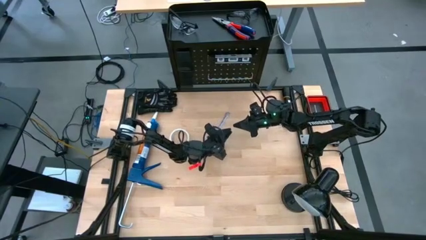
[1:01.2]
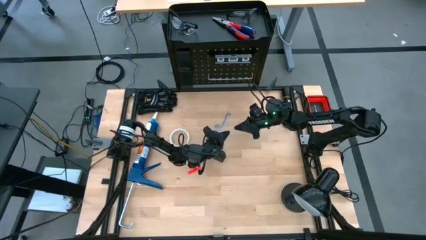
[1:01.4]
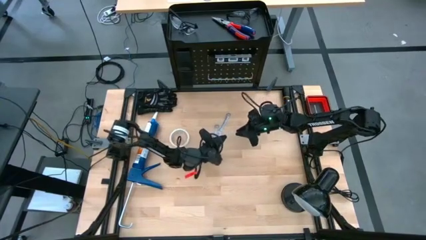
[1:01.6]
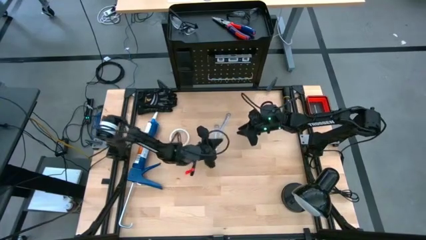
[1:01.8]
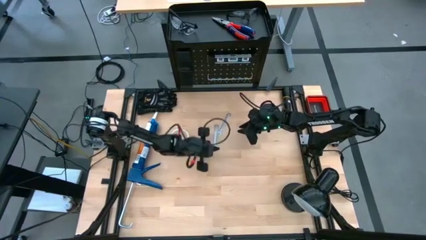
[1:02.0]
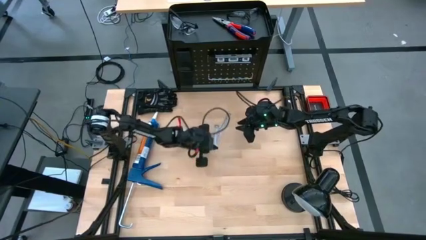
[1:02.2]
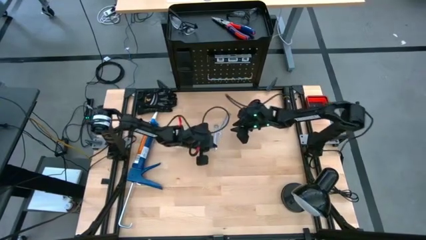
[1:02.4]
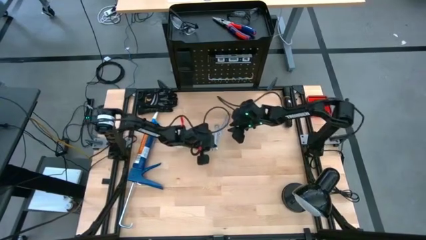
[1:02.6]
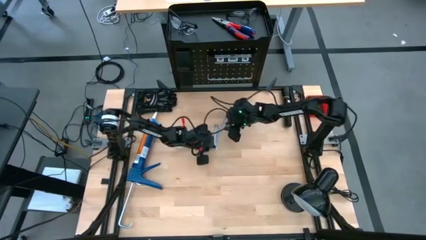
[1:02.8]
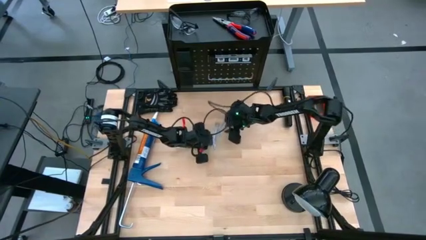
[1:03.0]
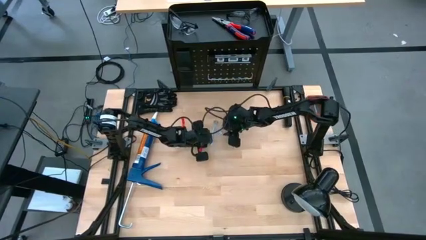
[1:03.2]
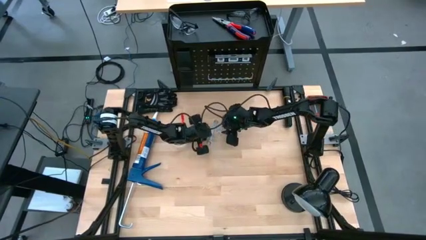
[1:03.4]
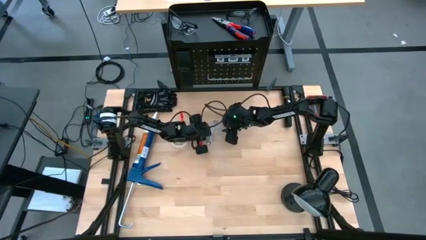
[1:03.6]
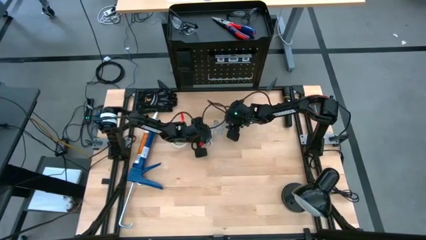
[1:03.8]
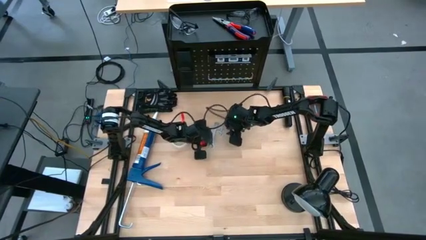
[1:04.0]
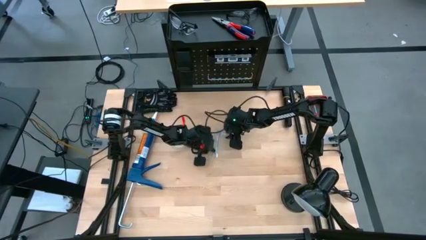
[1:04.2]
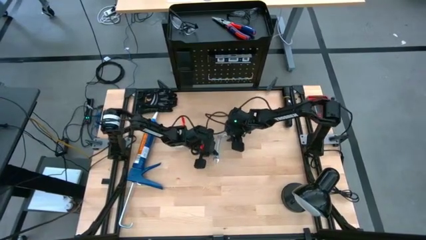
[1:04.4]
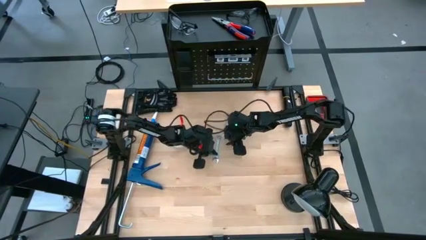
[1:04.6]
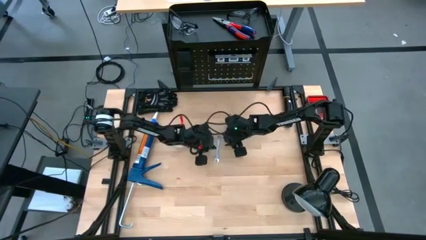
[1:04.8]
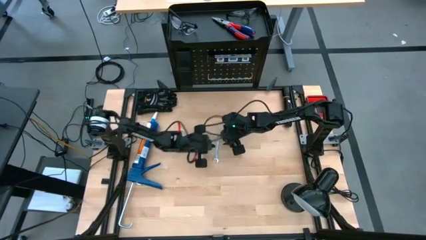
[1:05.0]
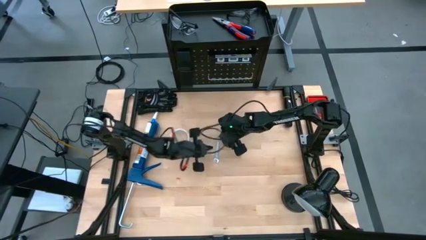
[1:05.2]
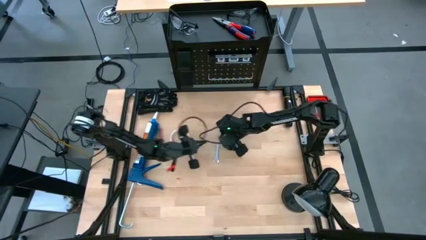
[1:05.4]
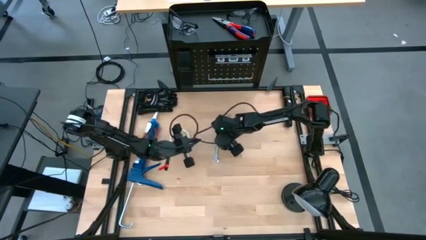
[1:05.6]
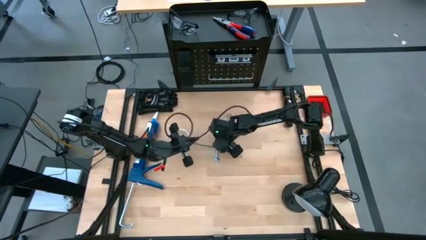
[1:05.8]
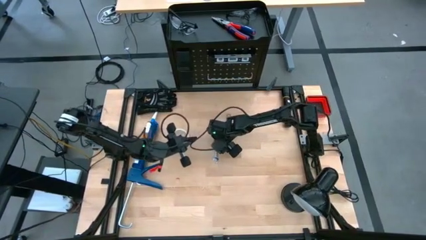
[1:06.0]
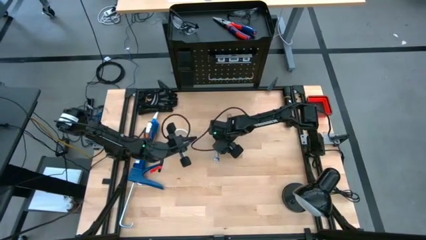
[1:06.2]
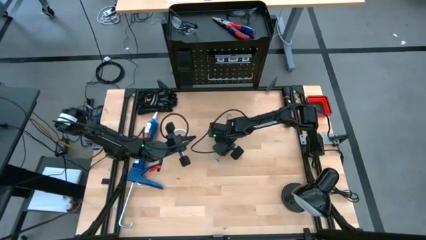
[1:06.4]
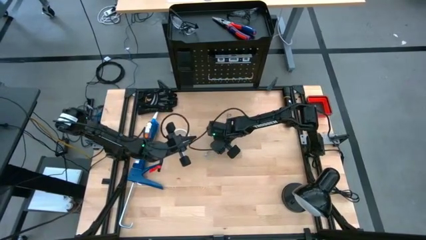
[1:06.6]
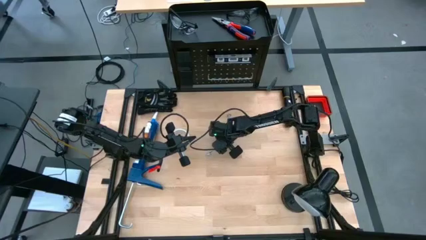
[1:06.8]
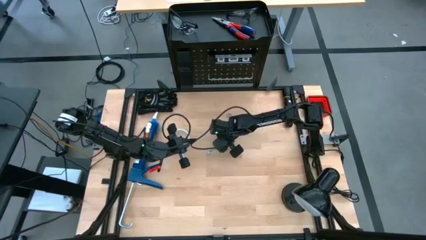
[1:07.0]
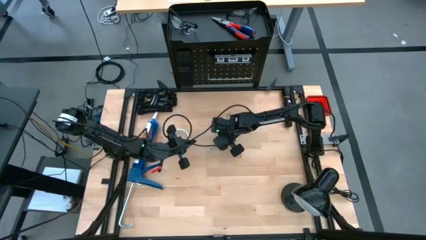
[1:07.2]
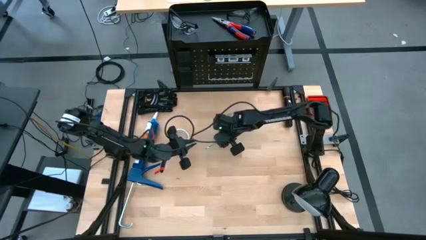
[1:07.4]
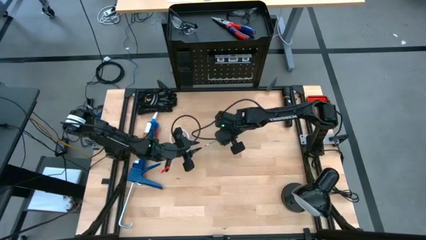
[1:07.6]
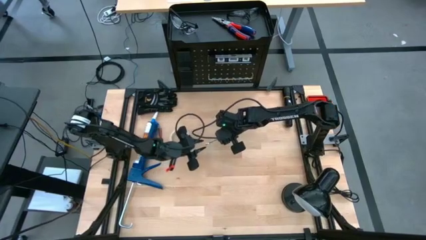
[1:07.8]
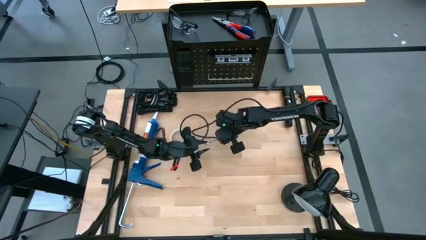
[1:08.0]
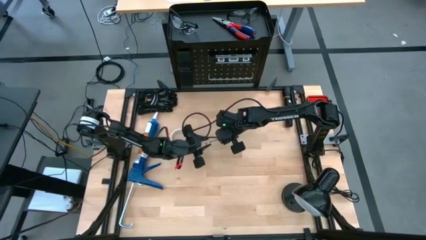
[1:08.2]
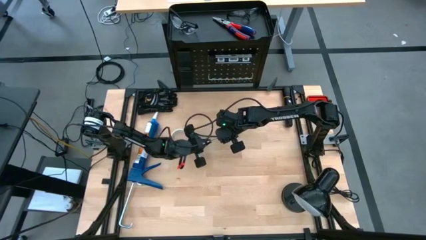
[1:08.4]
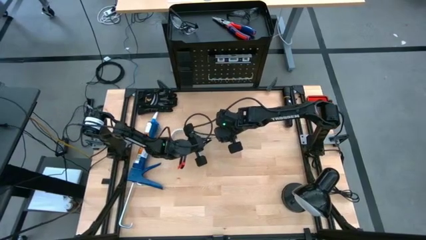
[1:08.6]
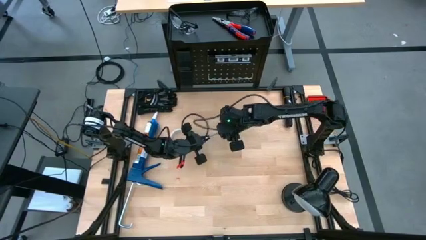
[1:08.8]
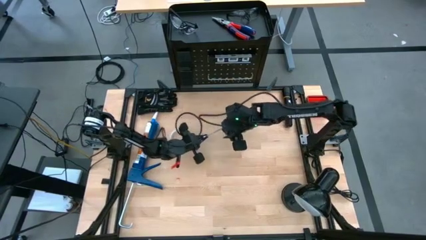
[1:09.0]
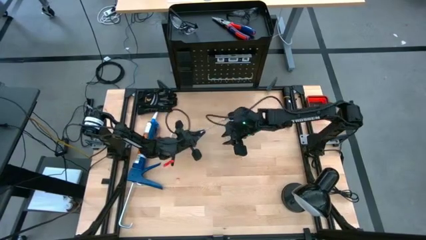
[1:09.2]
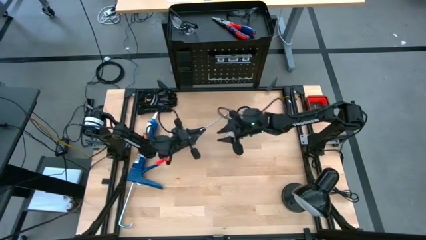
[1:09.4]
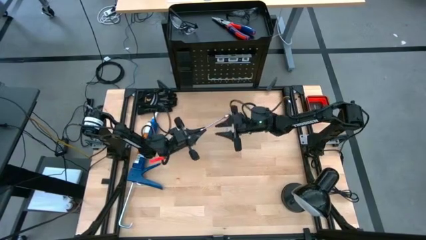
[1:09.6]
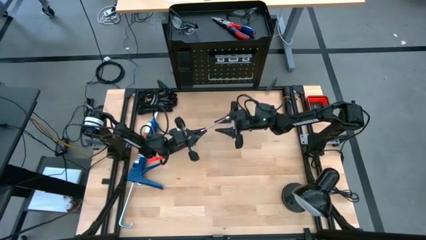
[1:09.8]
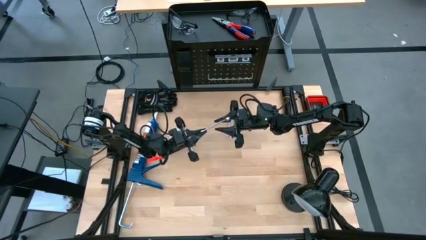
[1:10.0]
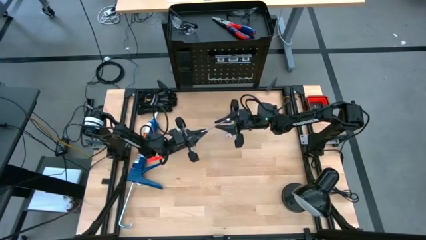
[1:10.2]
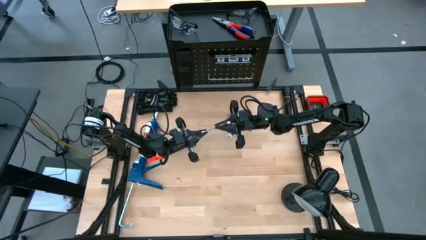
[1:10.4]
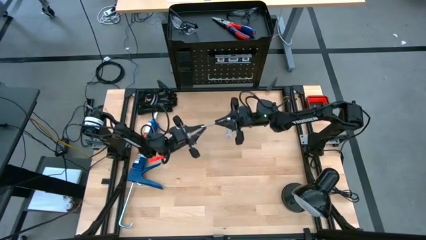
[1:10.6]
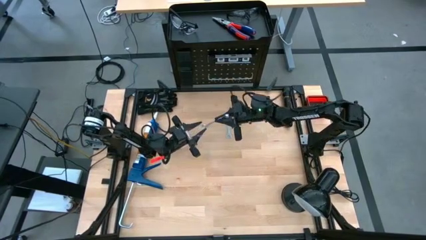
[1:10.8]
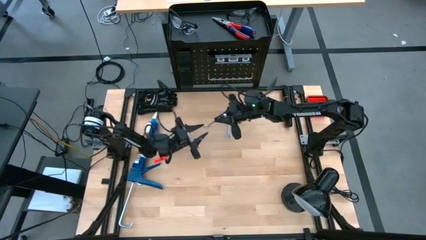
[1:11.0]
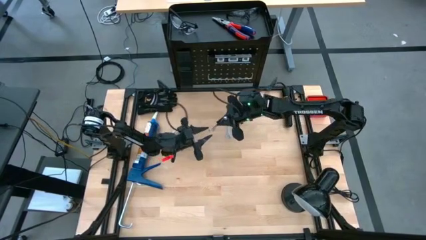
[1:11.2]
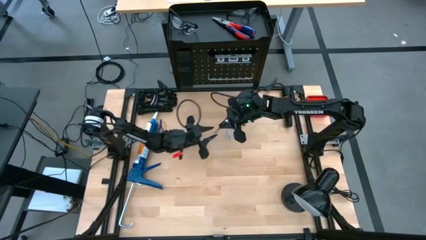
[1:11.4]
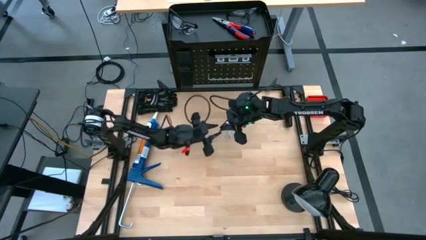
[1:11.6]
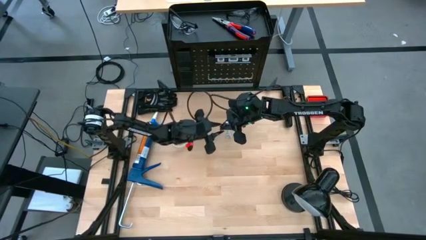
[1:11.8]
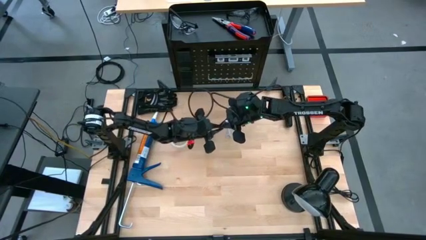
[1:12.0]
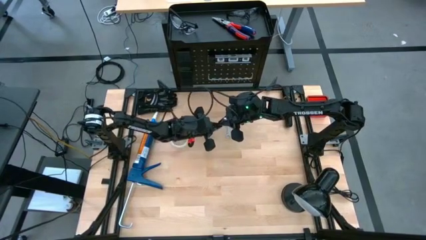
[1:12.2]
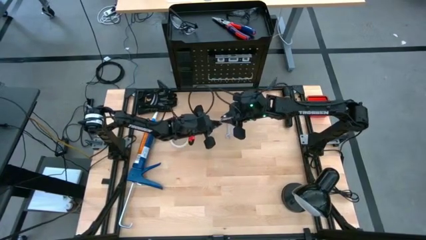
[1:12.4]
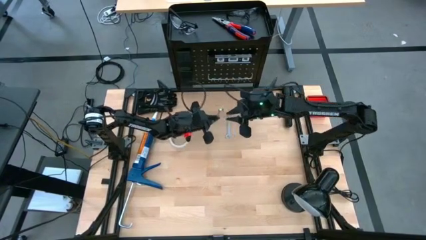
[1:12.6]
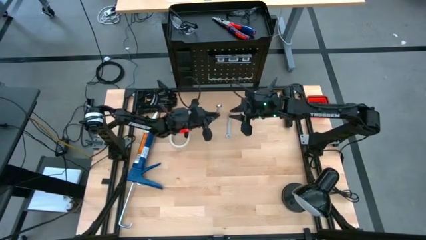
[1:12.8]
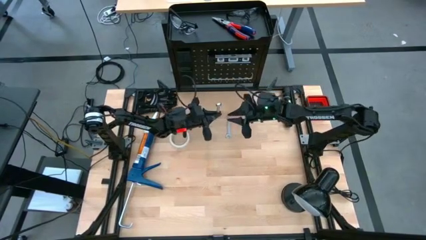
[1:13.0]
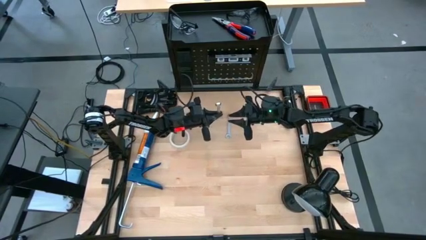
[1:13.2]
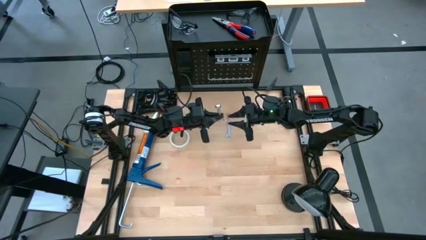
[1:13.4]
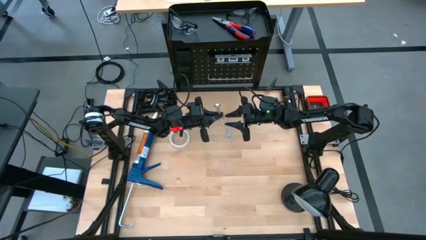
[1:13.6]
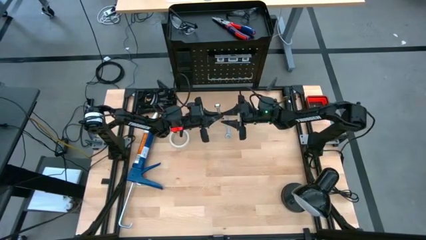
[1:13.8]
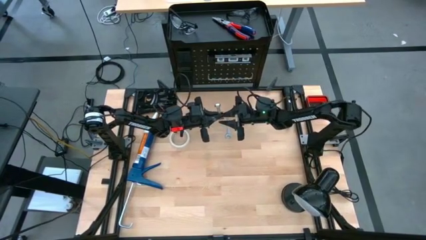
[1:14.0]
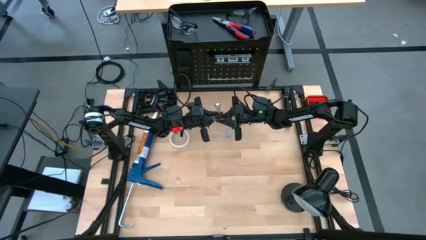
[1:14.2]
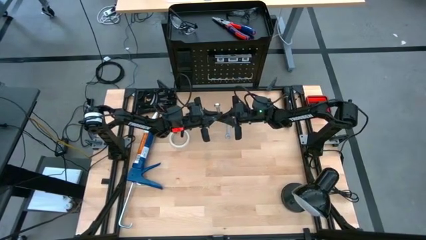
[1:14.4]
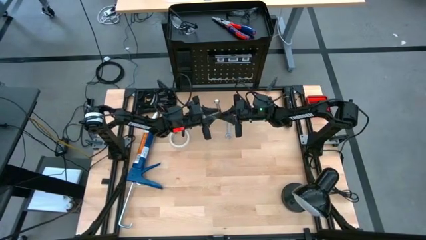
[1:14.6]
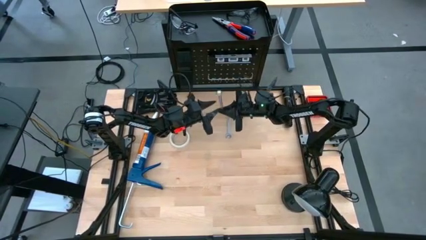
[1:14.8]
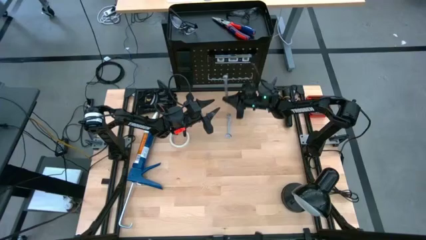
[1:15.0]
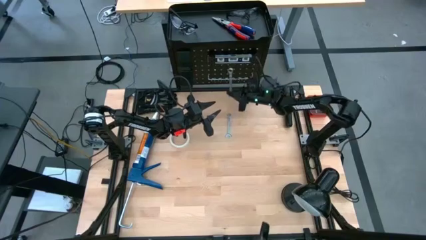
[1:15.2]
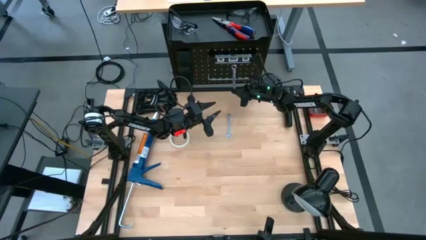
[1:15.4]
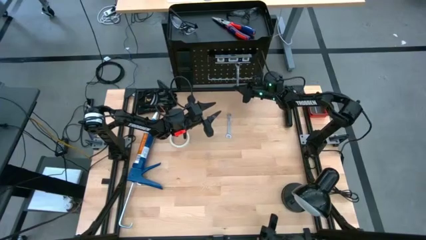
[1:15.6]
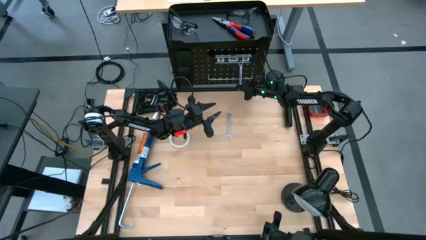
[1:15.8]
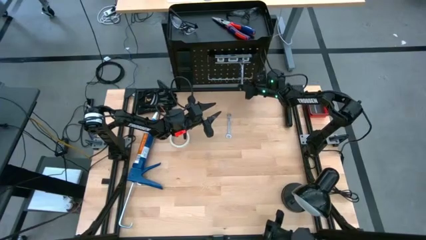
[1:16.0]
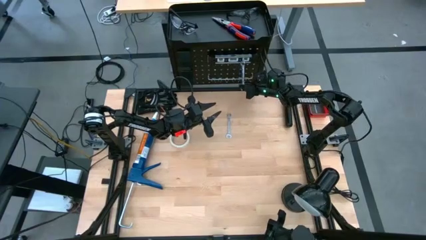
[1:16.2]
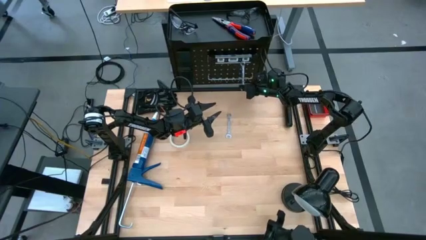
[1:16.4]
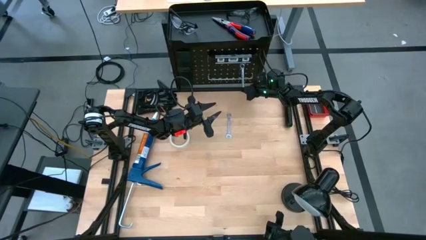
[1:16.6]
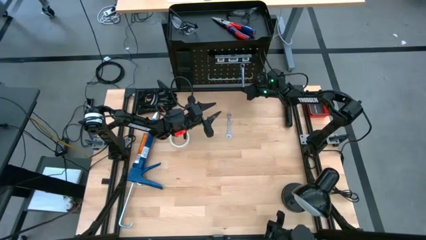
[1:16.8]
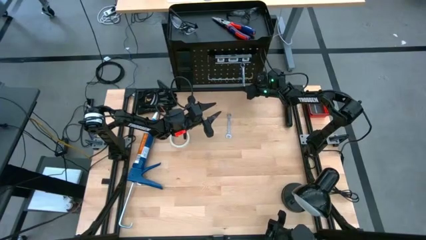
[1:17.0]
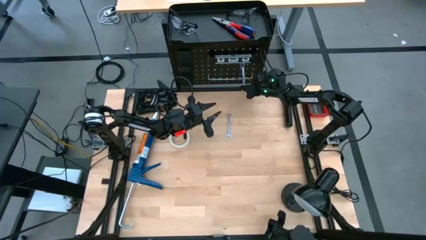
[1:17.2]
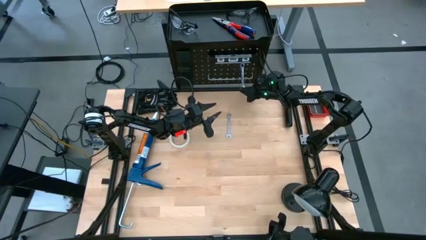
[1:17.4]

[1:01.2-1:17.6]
Task: Hang tools onto peg board
Hang the bottom wrench on the peg board
